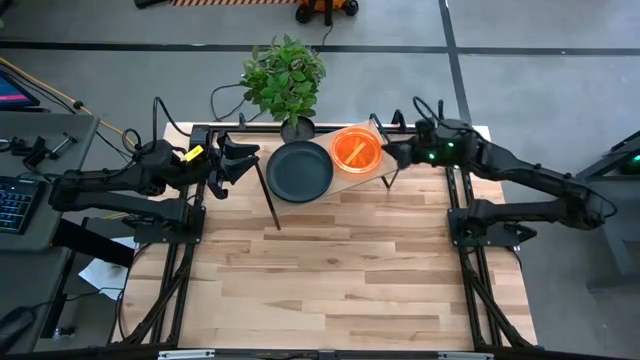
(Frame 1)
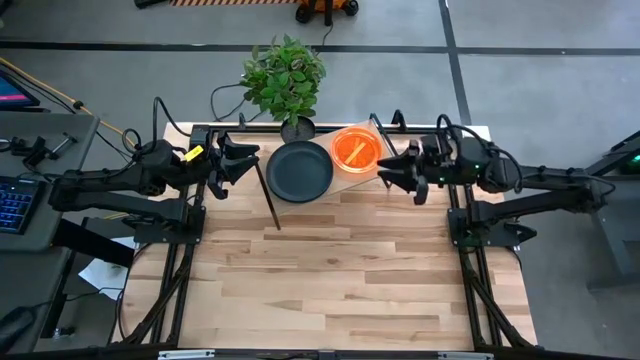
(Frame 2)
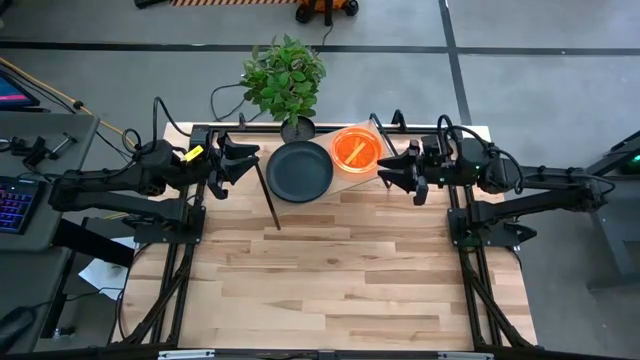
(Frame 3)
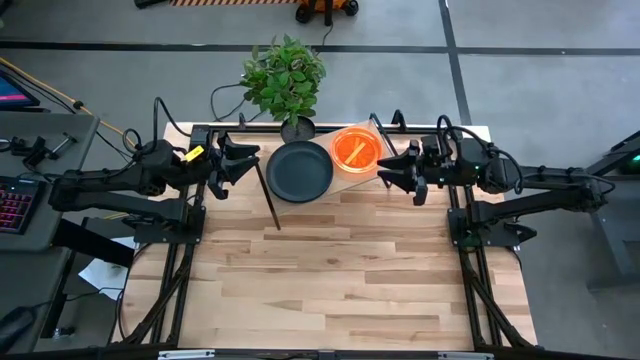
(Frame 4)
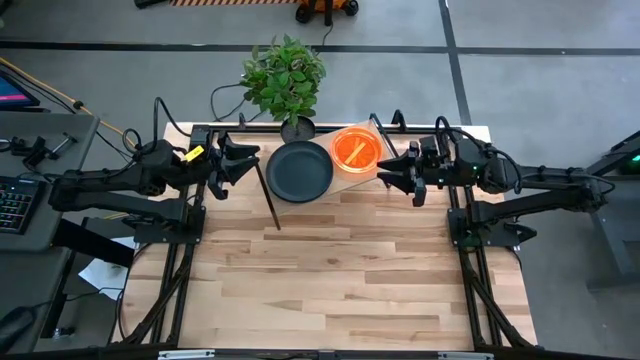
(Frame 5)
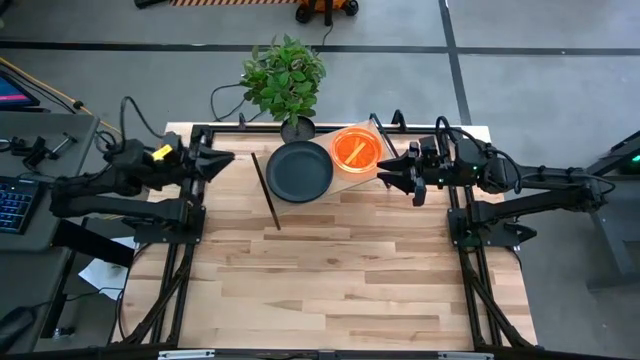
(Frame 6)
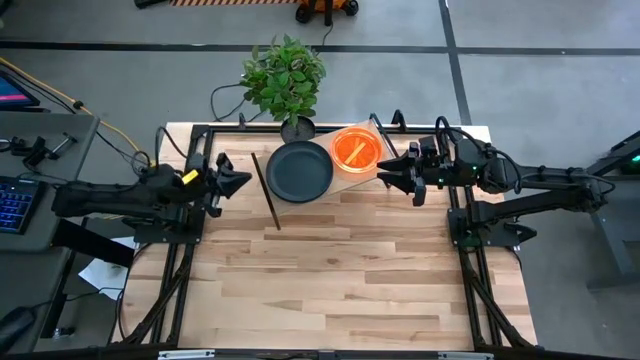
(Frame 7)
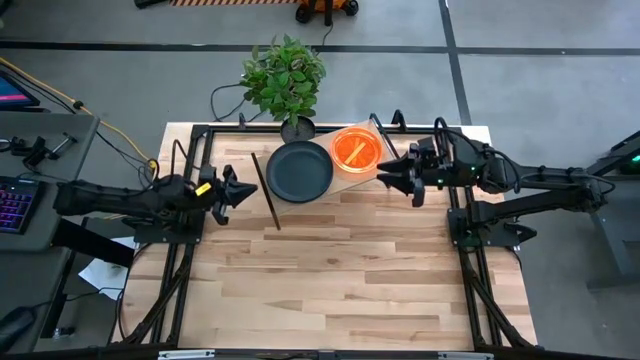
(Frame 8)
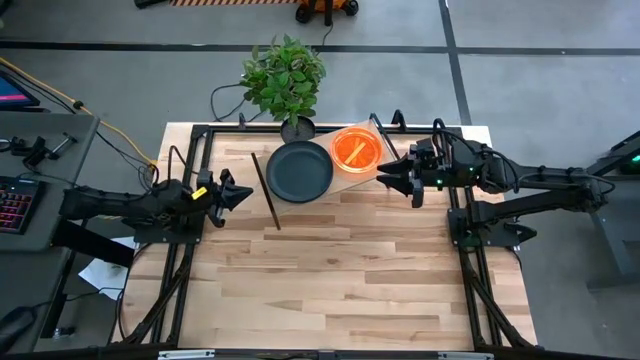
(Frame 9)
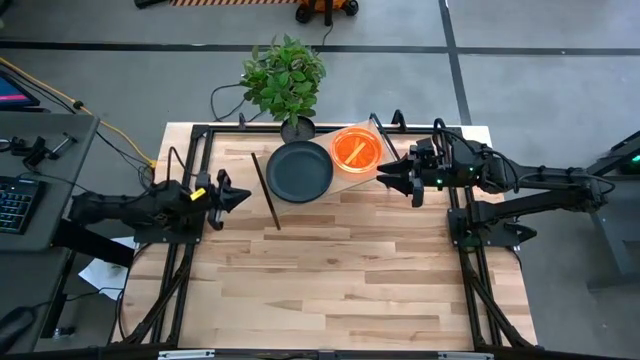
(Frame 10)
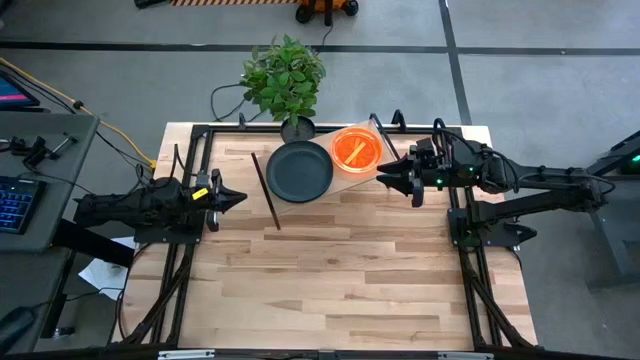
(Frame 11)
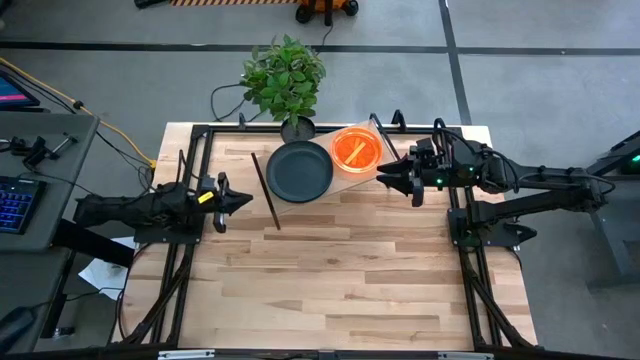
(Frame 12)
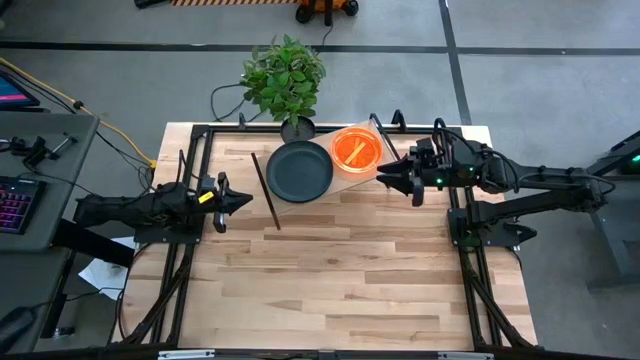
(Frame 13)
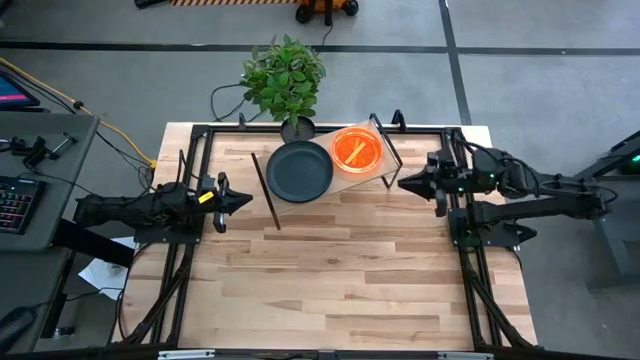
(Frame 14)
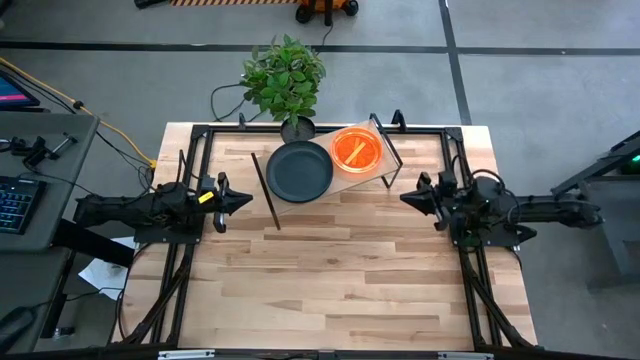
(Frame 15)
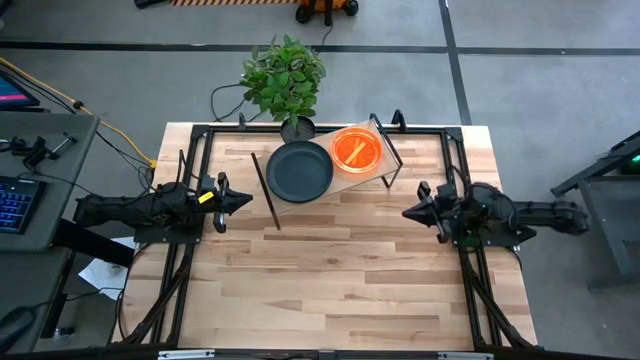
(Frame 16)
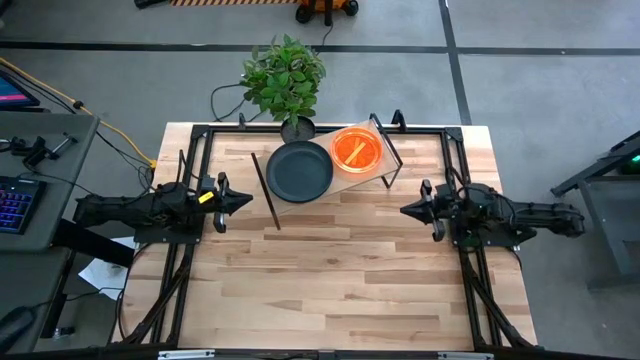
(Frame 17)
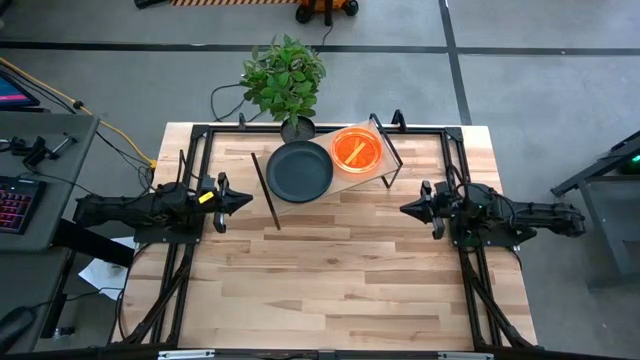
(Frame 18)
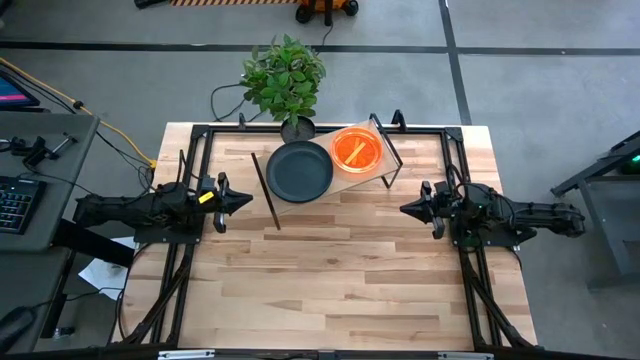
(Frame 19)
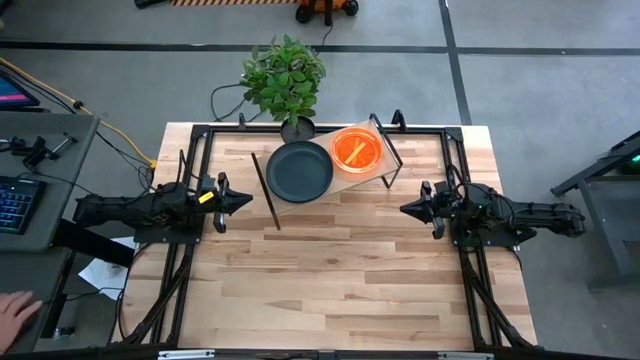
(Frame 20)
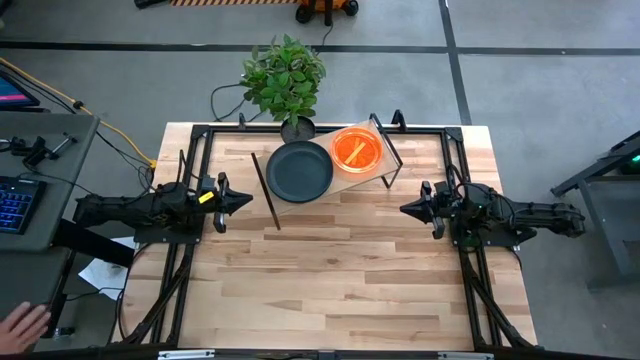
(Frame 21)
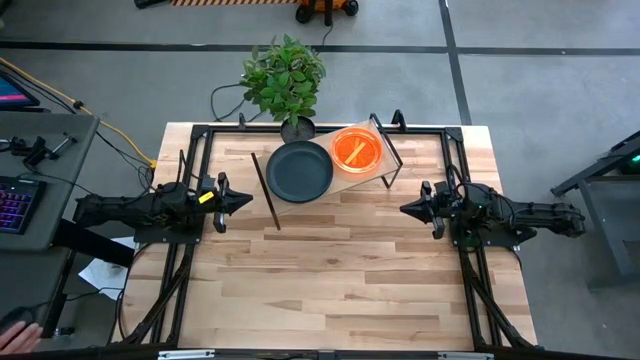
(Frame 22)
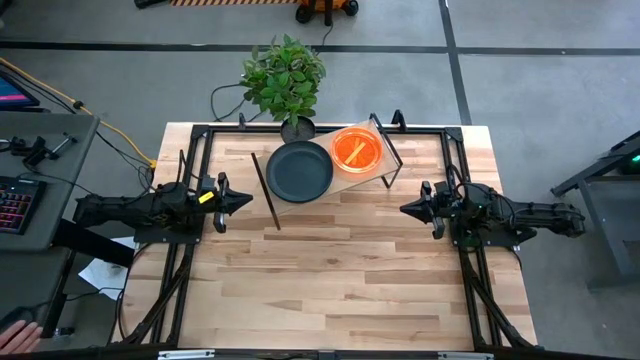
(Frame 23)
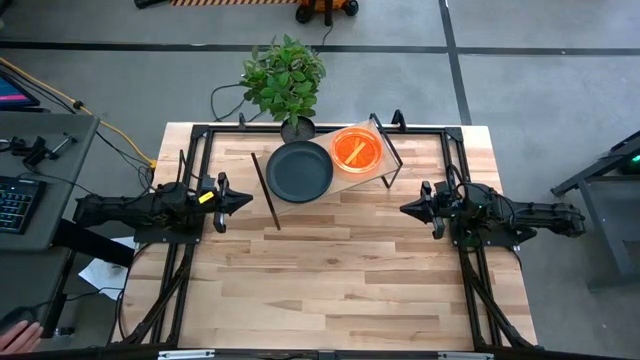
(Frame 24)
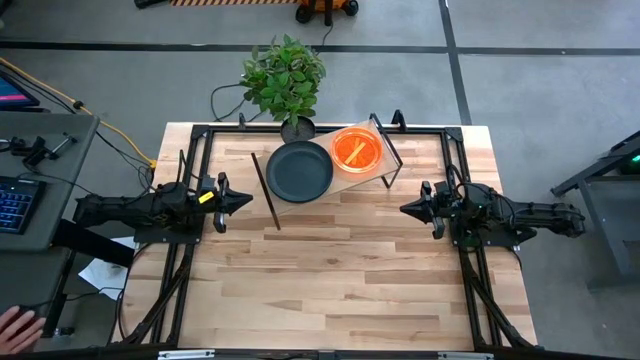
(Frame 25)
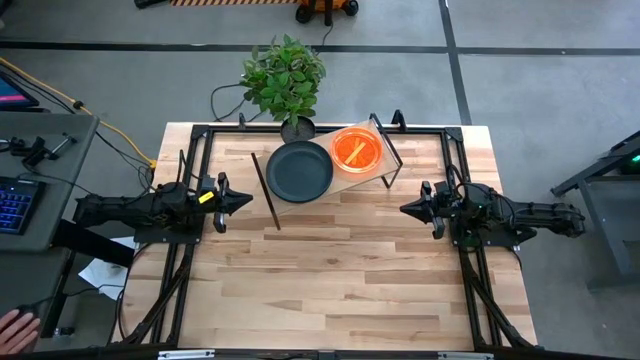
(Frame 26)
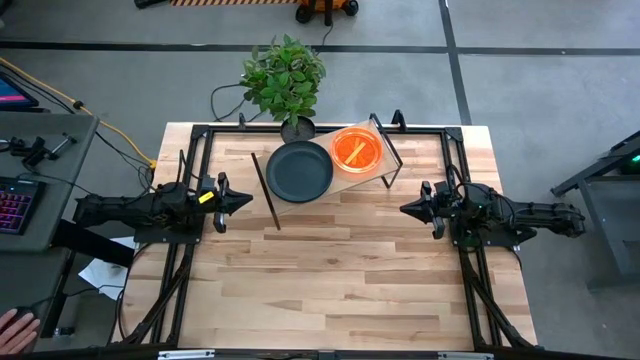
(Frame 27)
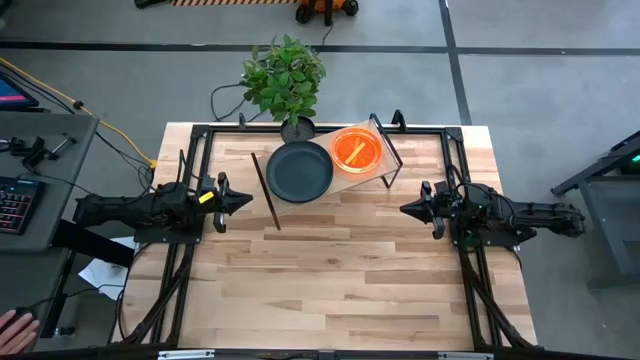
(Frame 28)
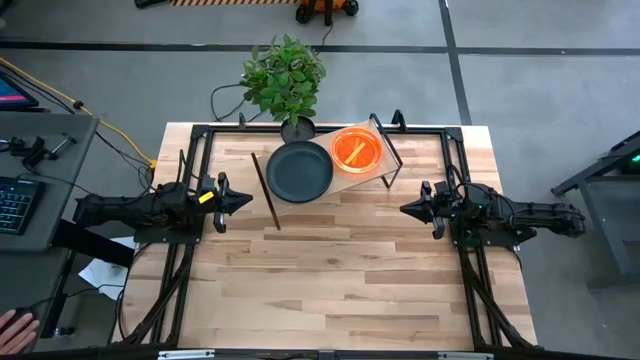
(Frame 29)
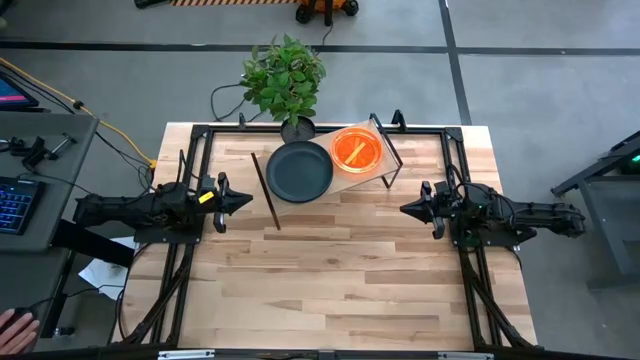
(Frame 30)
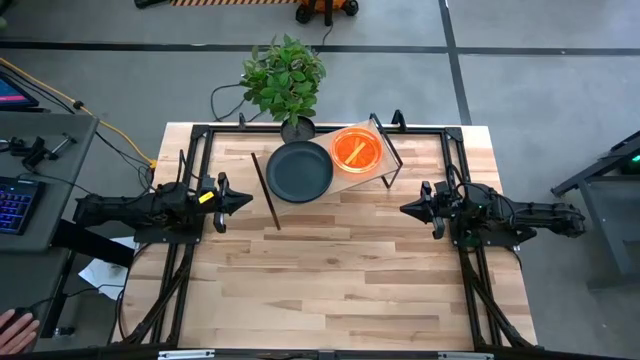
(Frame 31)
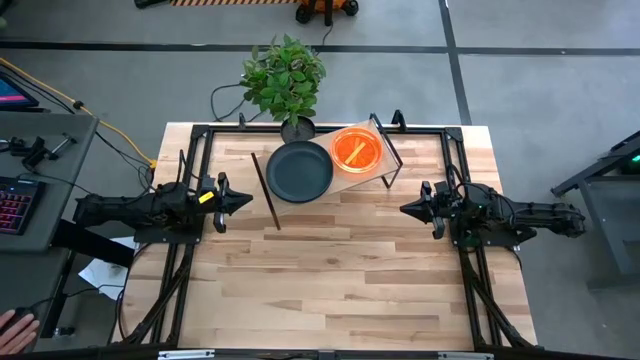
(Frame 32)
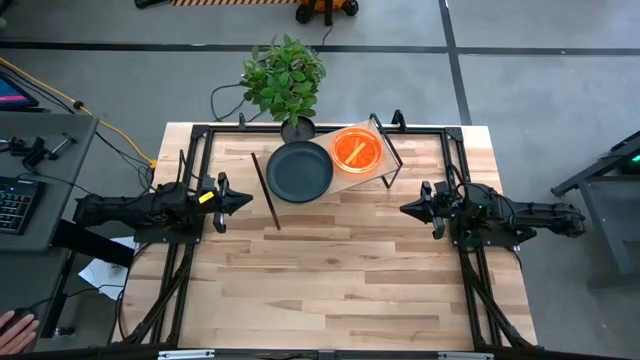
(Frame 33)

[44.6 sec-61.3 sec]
Task: Place and stack plates onto a shelf
Return to Home Position

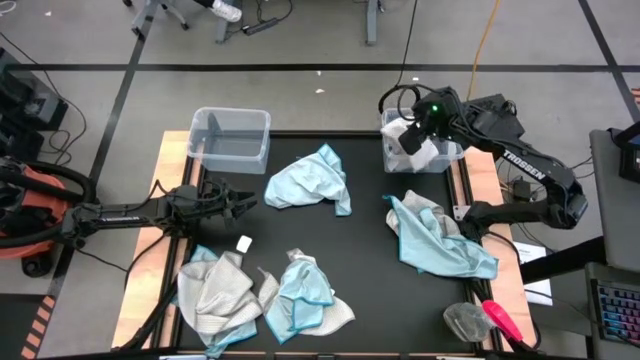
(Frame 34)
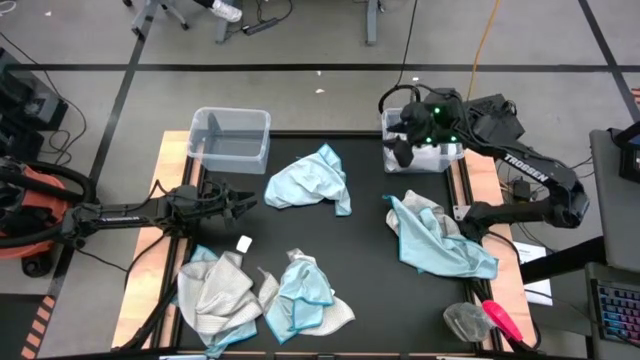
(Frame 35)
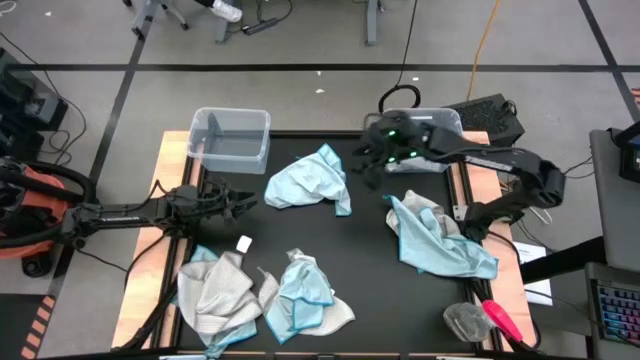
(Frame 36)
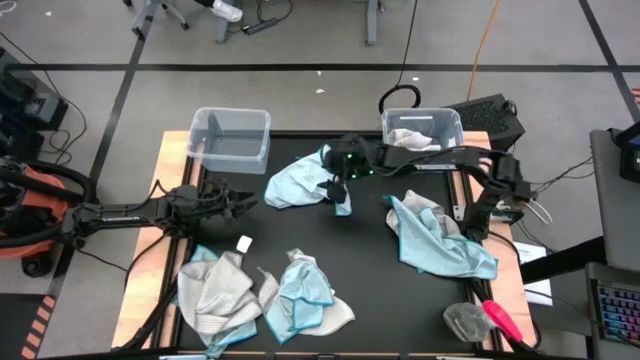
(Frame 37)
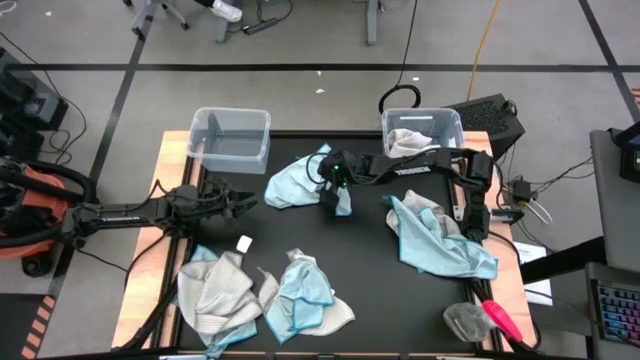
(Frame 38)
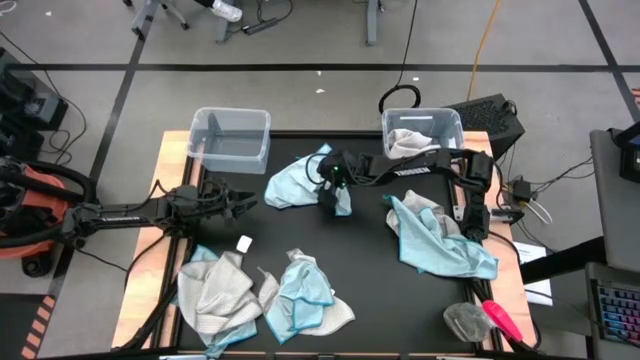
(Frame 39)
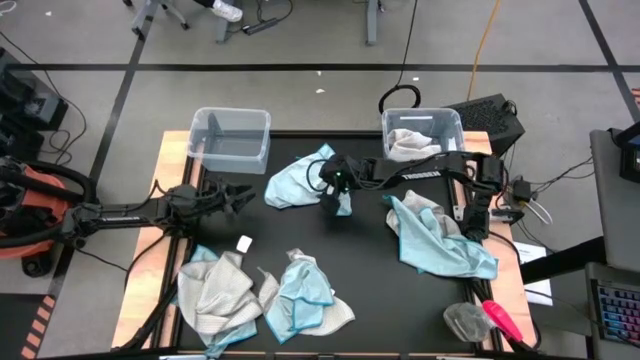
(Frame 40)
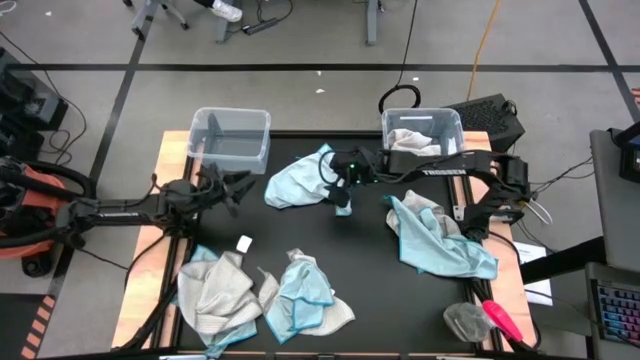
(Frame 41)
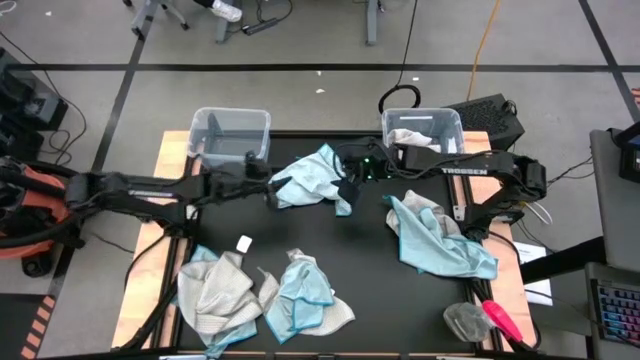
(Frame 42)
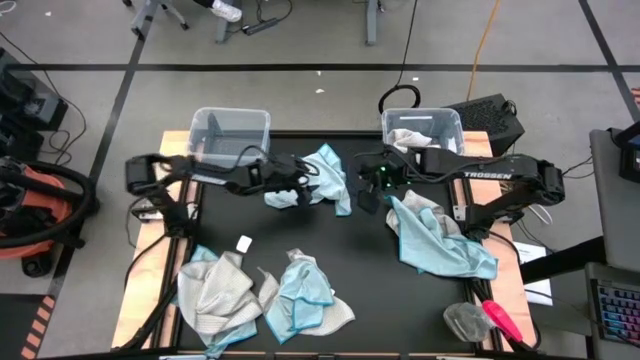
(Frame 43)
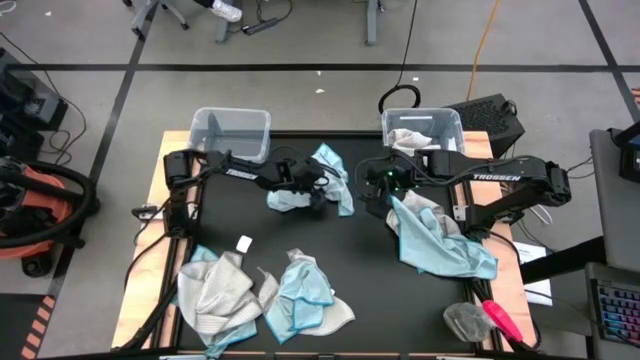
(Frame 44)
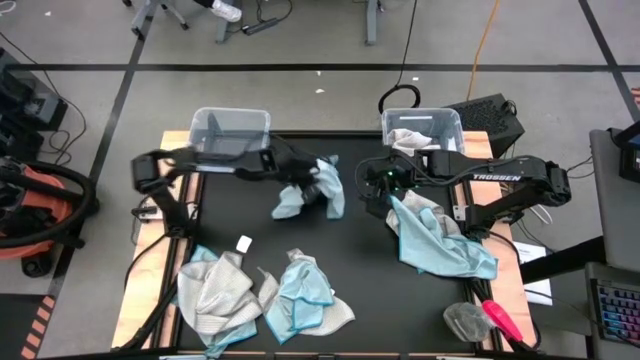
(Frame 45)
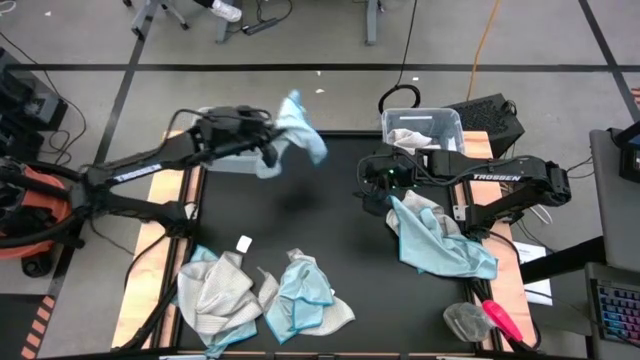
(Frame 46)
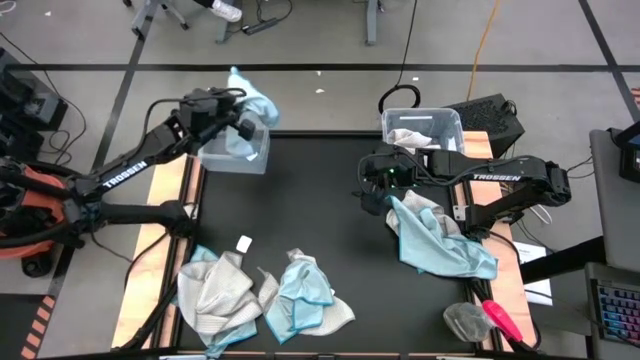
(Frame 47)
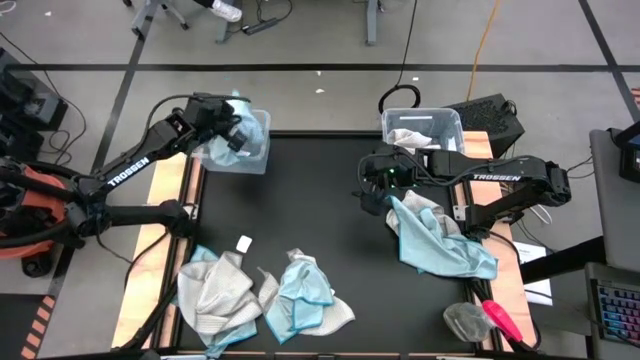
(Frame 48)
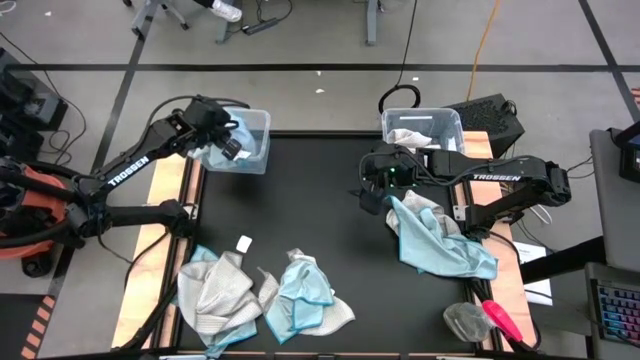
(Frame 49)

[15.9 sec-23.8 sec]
Task: Sort microfiber towel by color & place in baskets
Put the blue towel into the left transparent bin
